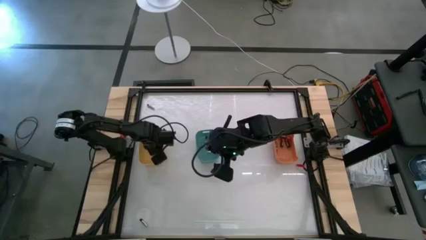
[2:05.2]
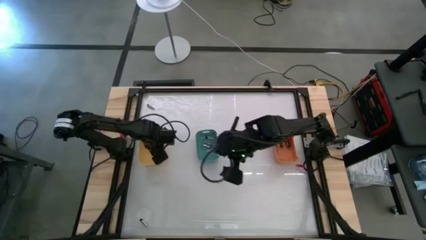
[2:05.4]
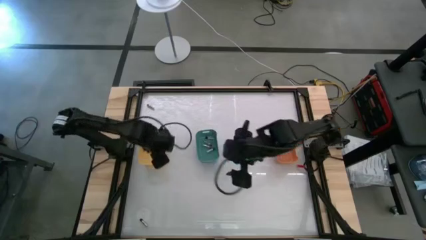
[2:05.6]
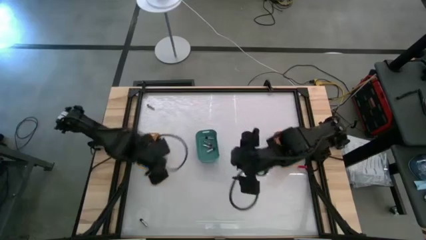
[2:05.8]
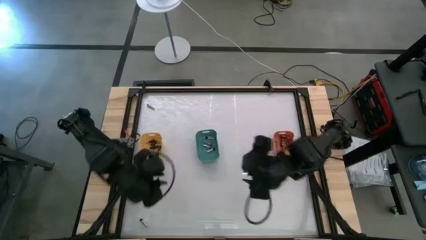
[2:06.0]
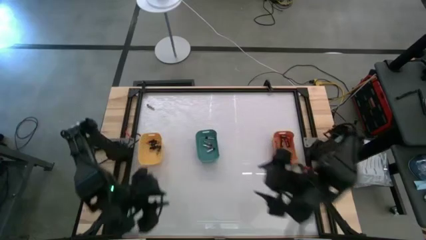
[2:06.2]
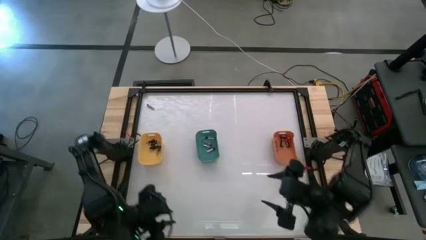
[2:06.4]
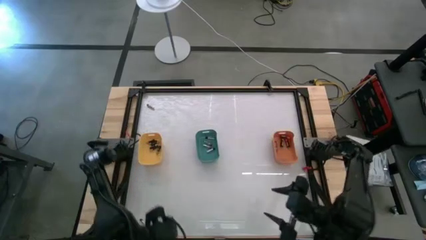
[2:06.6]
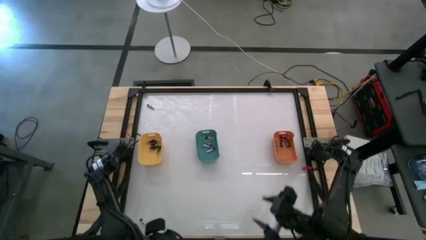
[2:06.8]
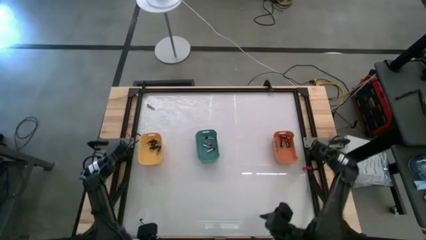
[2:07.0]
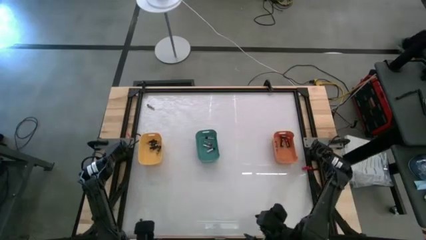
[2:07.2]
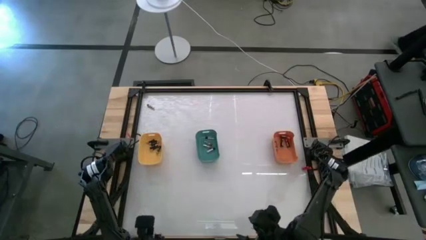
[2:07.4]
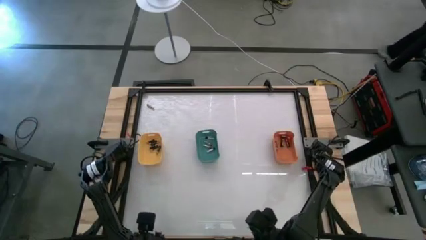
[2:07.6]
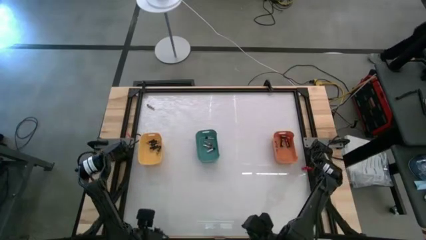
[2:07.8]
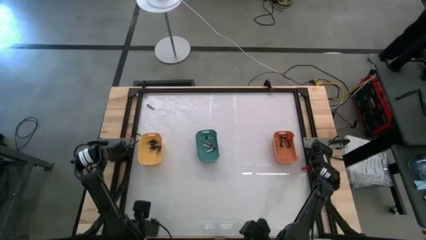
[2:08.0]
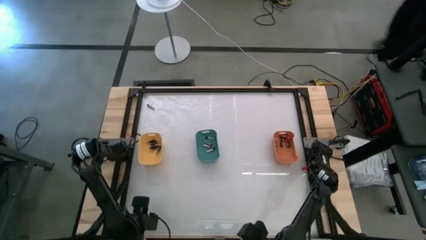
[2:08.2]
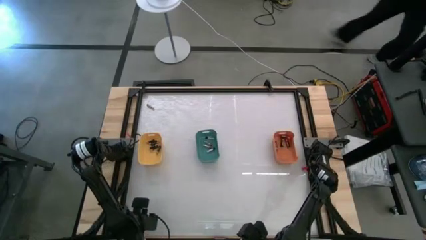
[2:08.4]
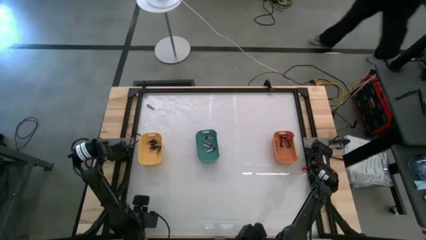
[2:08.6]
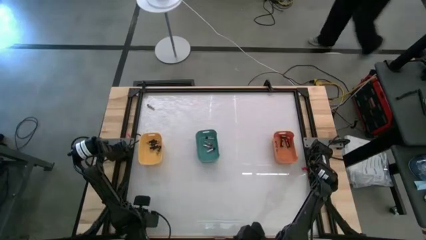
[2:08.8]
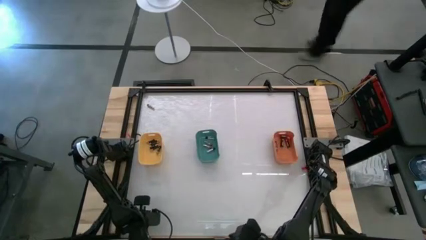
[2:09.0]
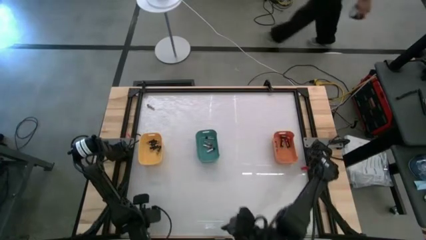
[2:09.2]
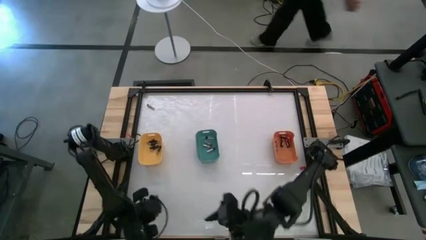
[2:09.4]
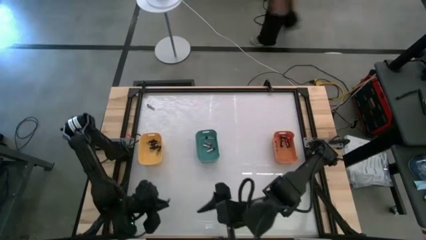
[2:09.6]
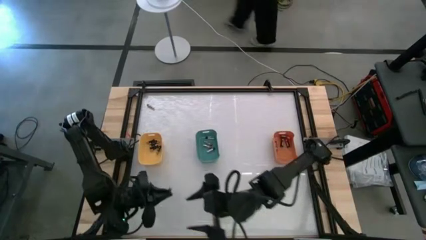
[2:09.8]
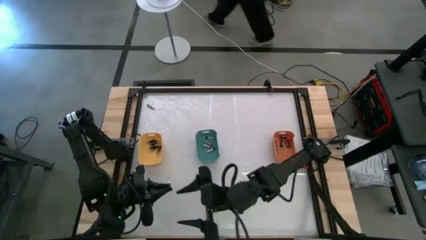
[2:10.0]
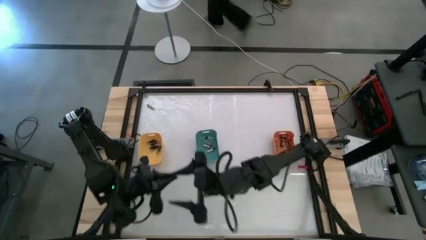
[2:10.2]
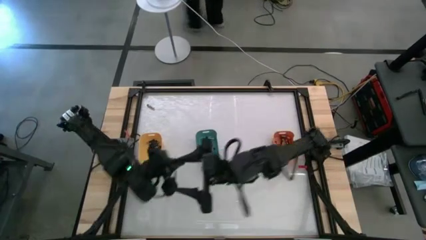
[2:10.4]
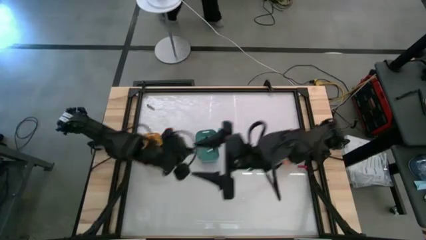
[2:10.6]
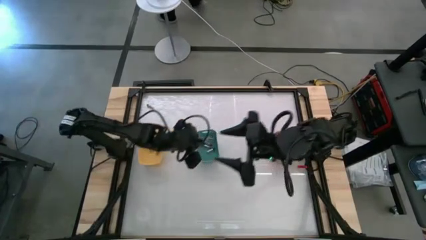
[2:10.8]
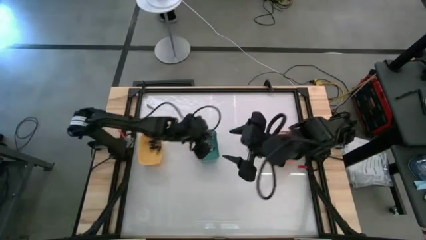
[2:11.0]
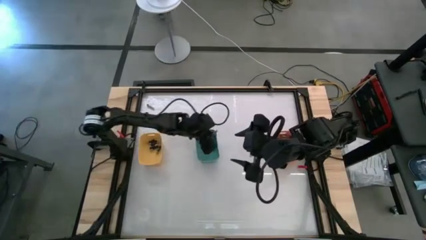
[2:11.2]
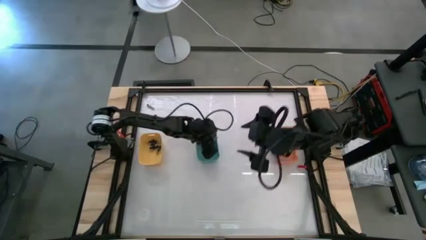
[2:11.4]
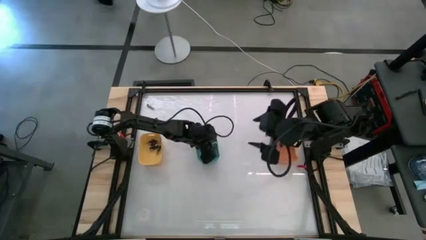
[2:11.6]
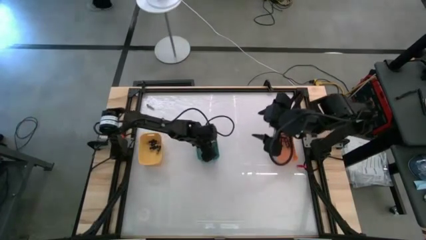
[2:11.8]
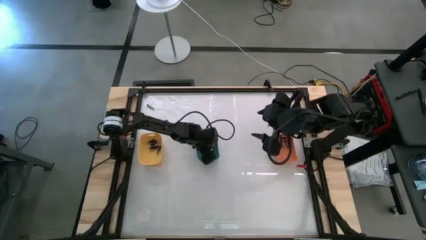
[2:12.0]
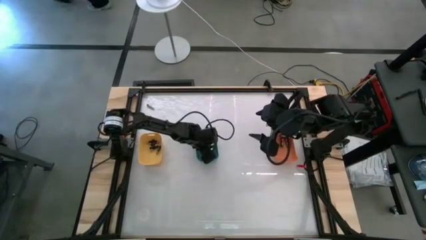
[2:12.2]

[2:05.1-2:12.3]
Task: Sort batteries
Put the silver battery into the green bin

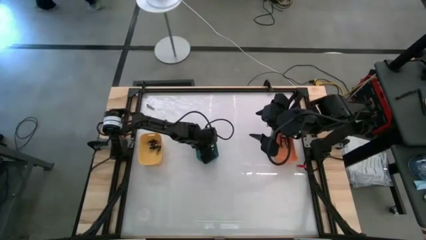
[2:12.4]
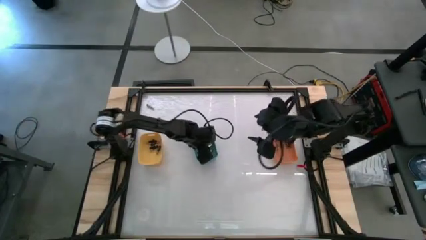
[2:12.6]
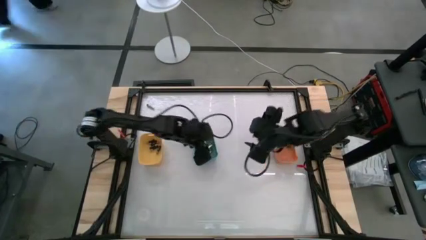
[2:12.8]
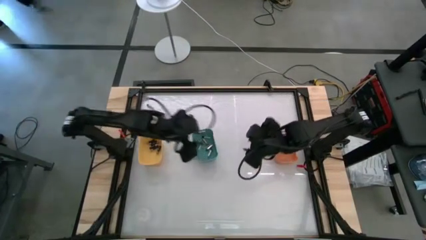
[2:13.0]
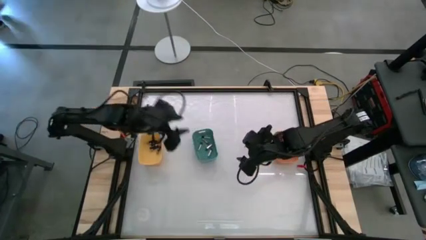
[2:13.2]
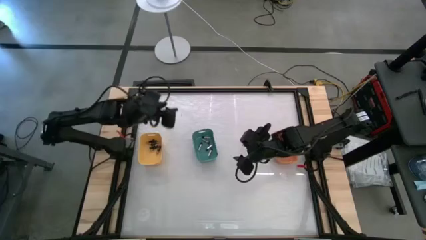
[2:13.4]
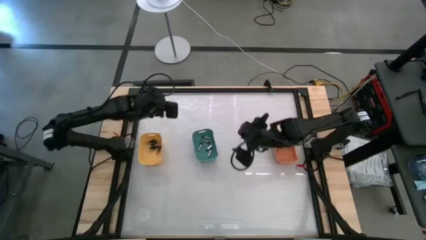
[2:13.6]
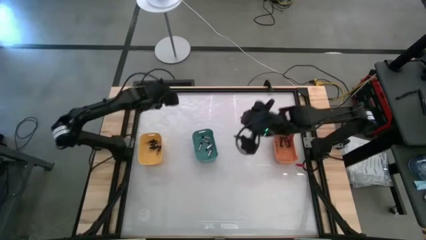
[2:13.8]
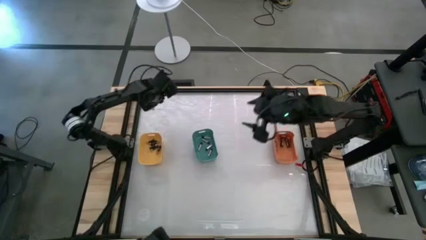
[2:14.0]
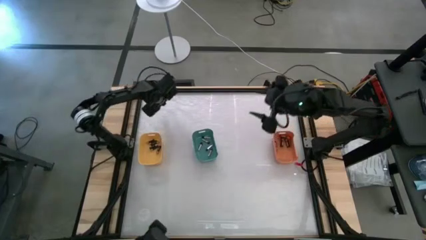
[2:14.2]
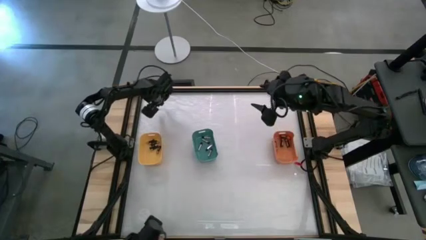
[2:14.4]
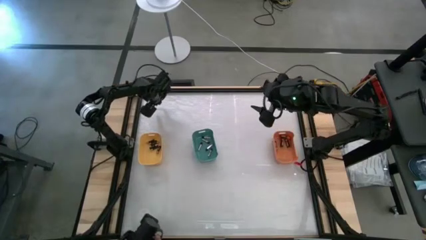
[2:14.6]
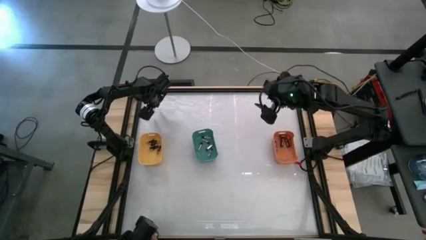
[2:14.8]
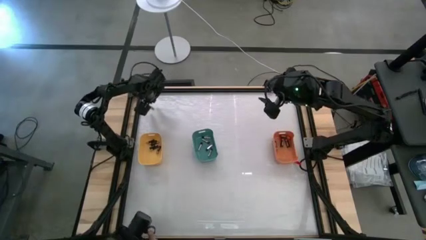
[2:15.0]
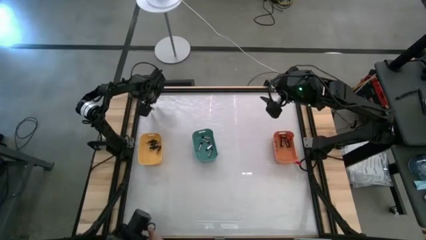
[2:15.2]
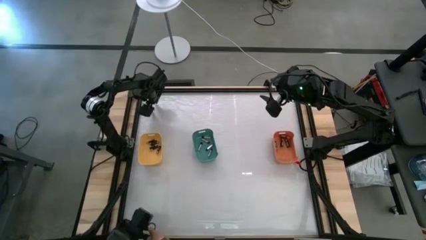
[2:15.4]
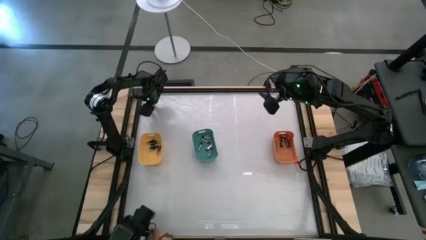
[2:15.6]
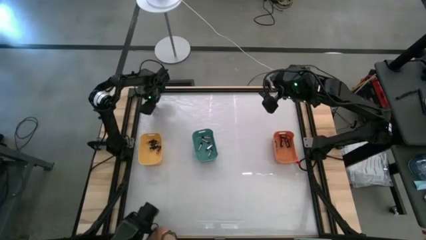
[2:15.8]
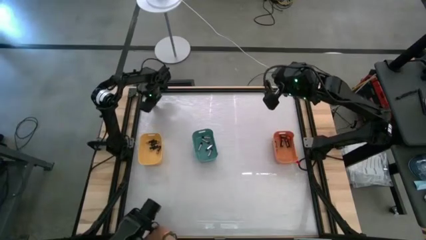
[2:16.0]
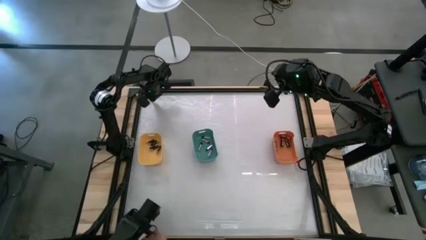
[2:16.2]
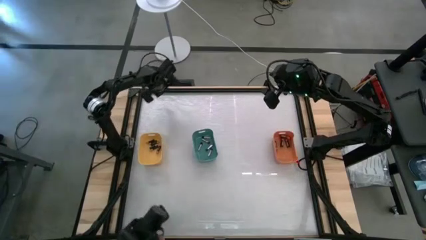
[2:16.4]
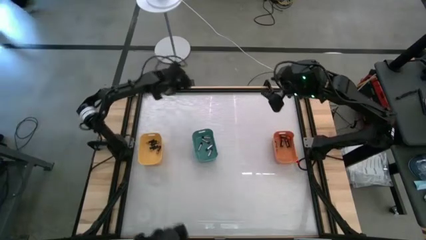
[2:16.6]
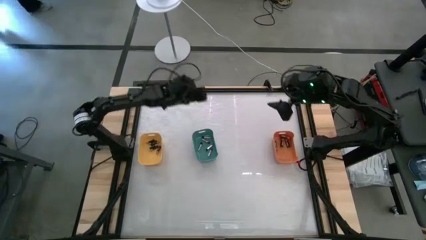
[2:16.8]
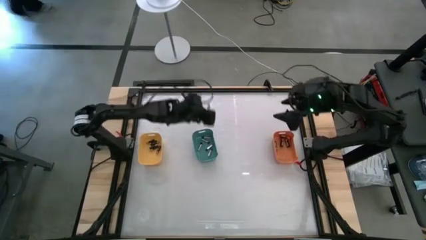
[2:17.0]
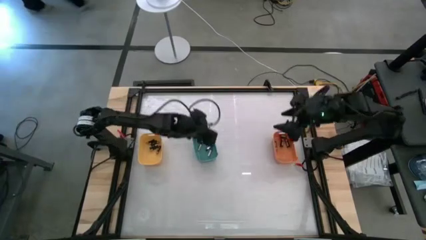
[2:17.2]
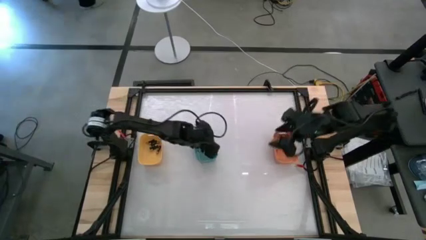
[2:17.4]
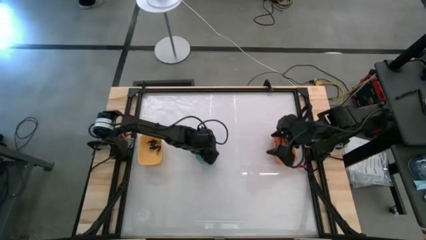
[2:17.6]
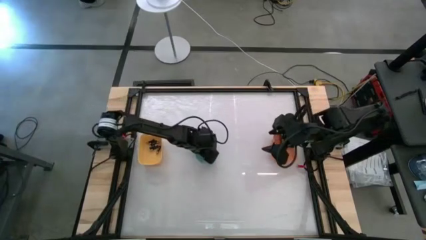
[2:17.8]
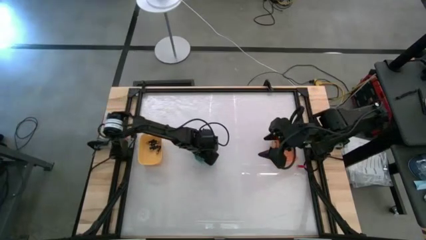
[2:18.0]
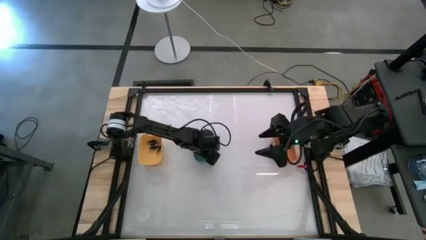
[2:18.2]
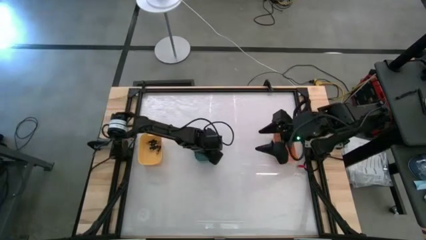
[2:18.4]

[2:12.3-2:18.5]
Put the silver battery into the green bin

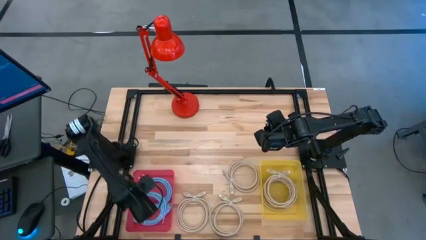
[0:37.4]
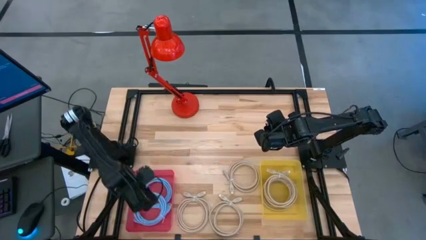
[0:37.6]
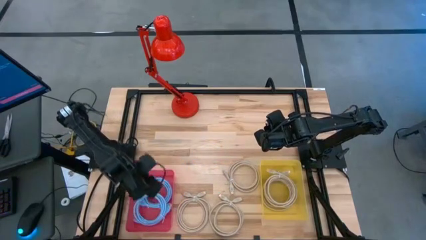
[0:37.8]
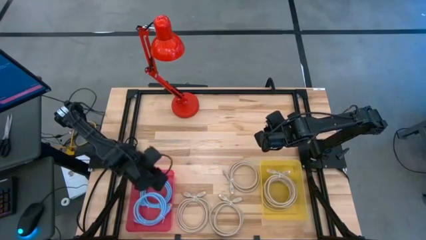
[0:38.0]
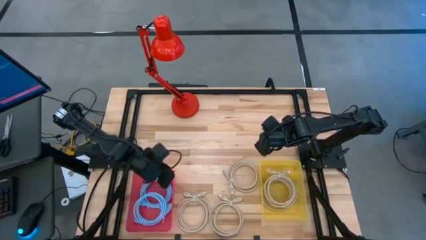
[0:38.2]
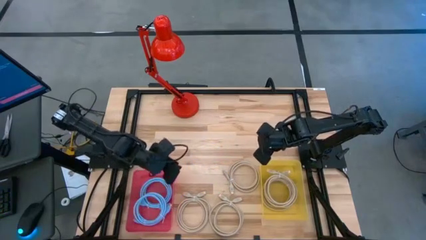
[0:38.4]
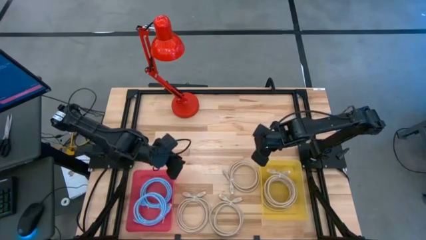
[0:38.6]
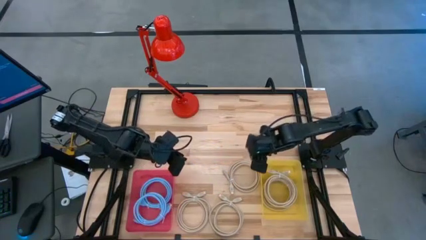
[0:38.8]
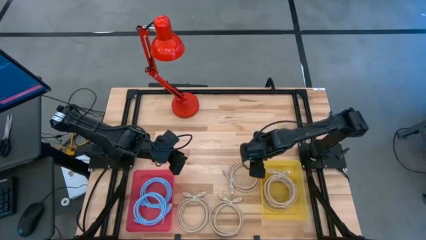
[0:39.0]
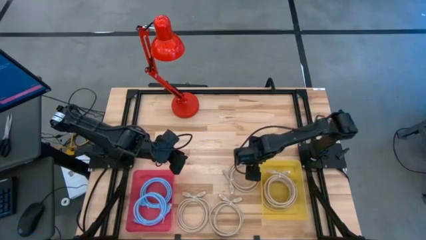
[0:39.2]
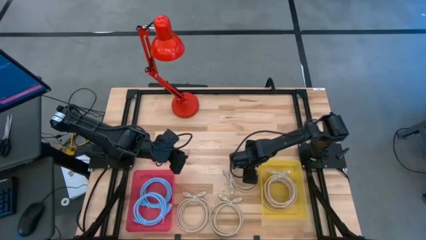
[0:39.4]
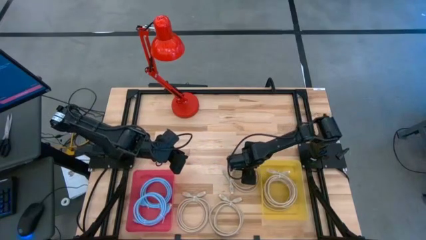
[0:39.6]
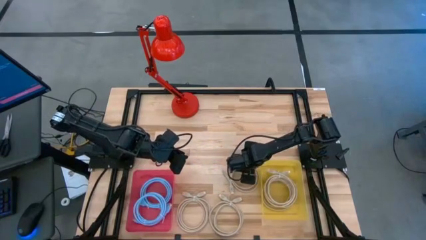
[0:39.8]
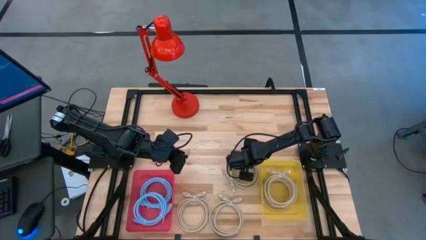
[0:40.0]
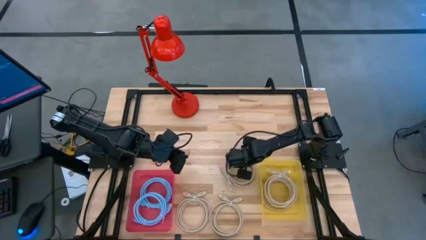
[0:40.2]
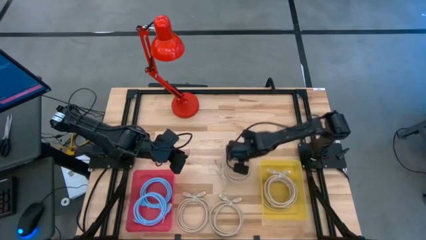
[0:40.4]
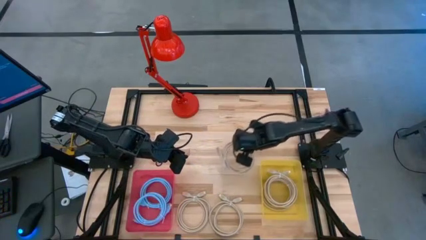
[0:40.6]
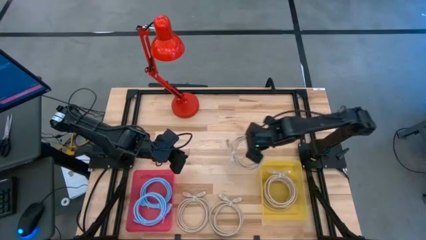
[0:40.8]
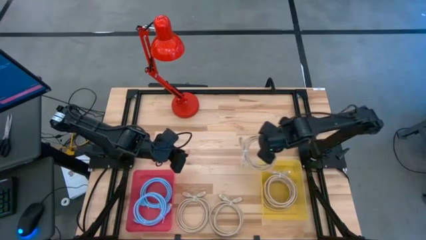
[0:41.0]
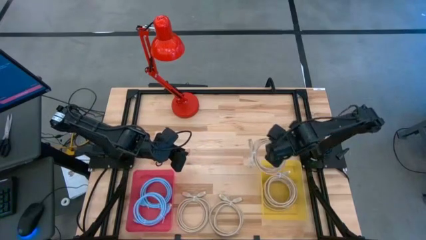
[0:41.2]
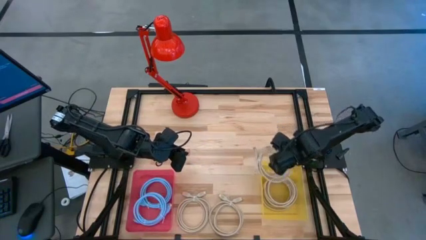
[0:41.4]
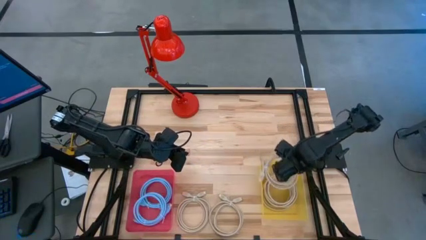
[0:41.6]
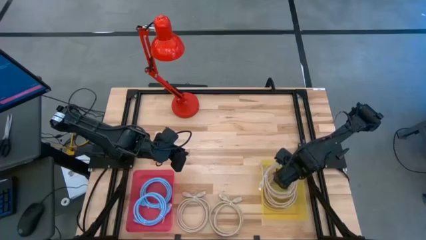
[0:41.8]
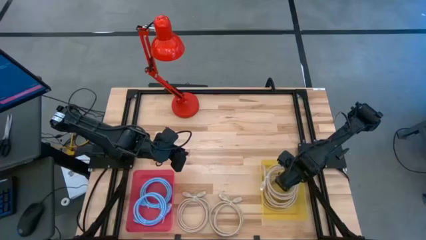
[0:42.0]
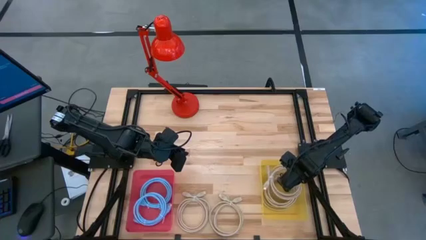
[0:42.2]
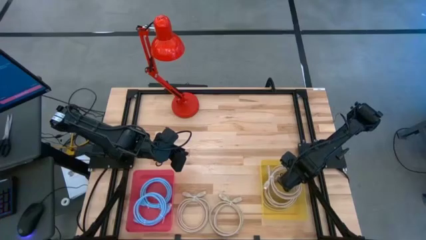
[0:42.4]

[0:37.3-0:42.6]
Task: Pick & Place USB Port
Put the light yellow charger cable into the yellow bin
